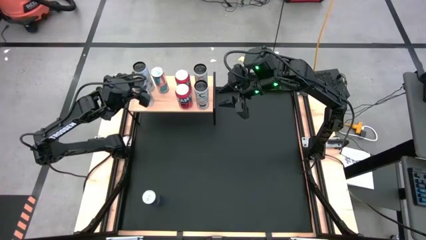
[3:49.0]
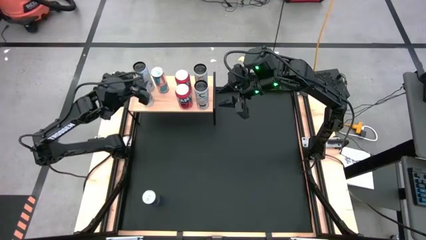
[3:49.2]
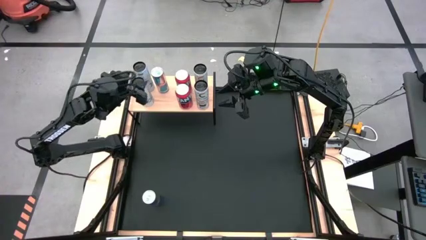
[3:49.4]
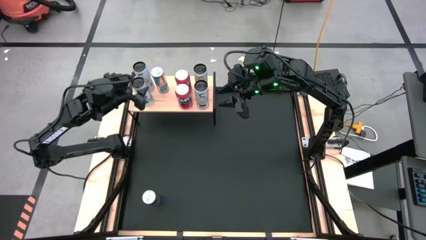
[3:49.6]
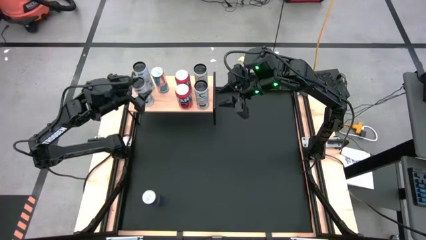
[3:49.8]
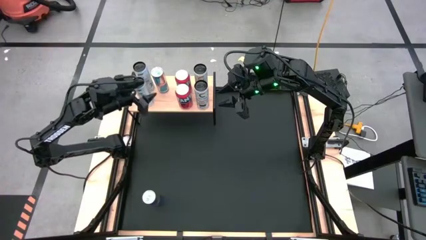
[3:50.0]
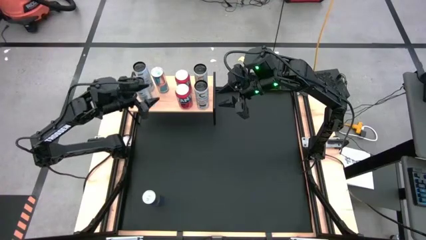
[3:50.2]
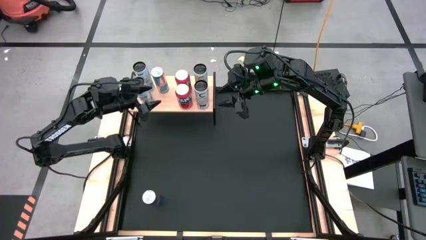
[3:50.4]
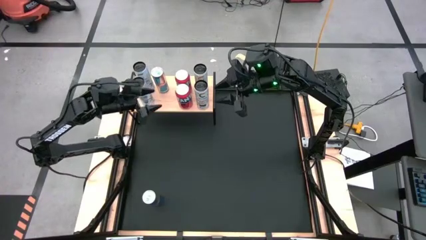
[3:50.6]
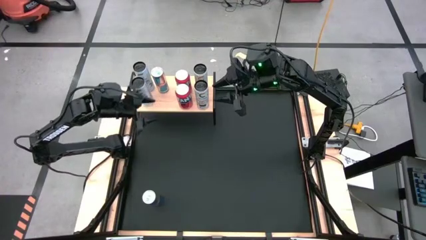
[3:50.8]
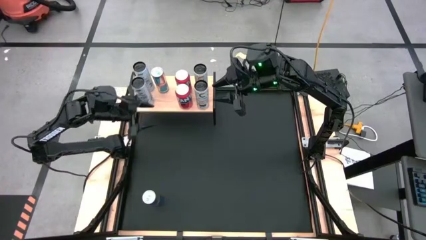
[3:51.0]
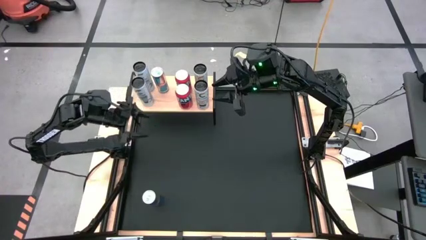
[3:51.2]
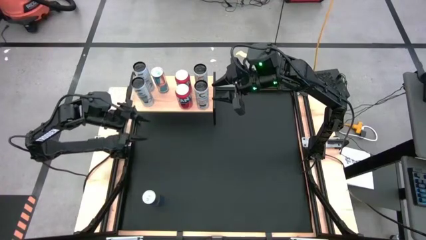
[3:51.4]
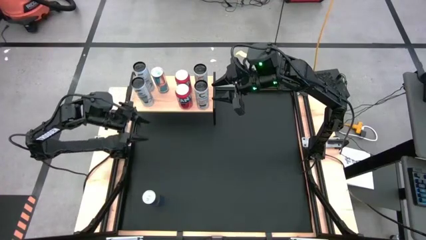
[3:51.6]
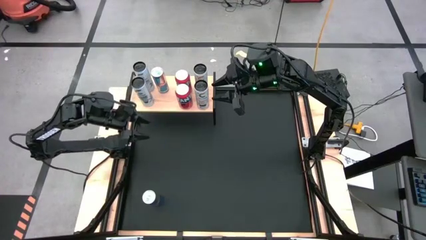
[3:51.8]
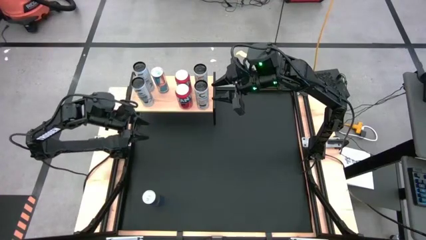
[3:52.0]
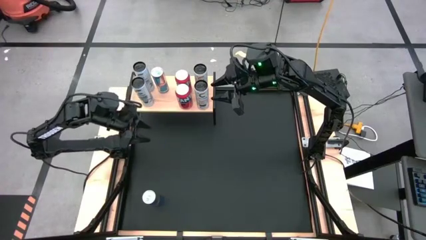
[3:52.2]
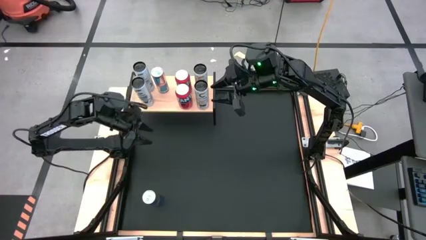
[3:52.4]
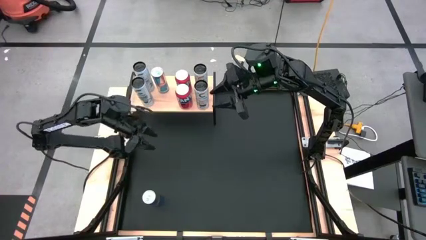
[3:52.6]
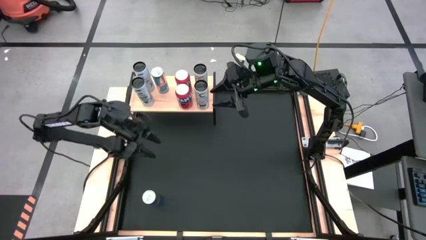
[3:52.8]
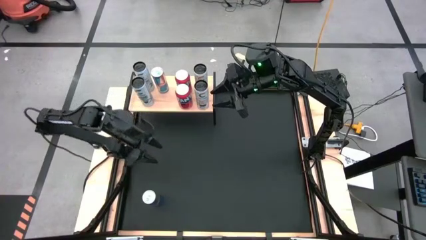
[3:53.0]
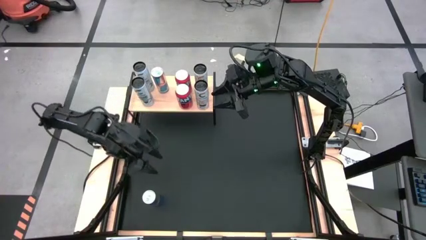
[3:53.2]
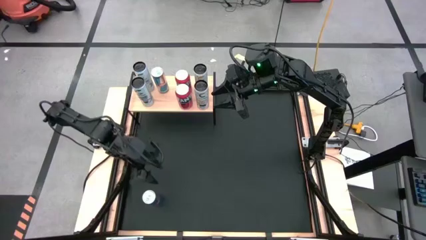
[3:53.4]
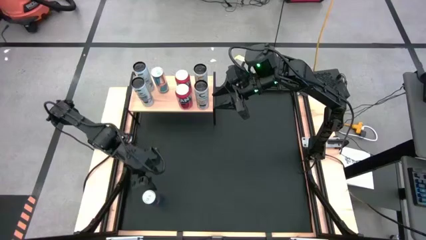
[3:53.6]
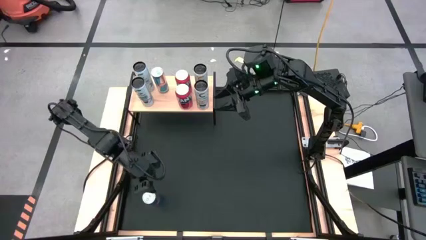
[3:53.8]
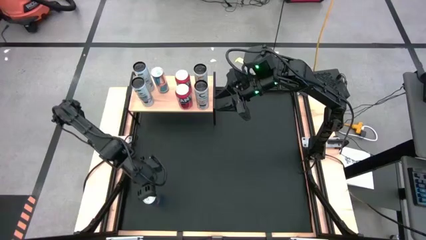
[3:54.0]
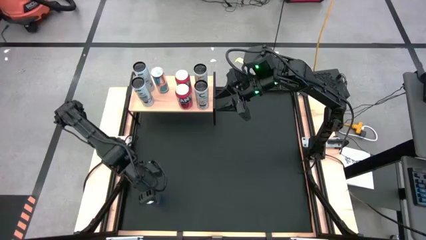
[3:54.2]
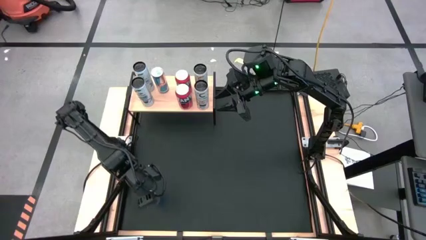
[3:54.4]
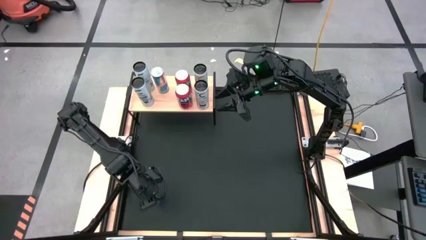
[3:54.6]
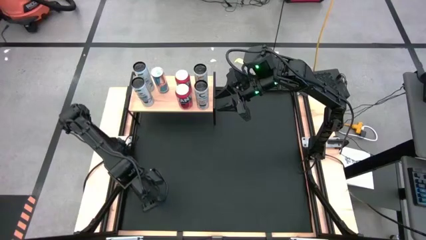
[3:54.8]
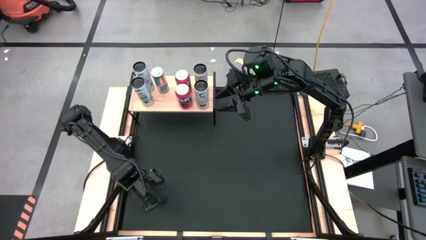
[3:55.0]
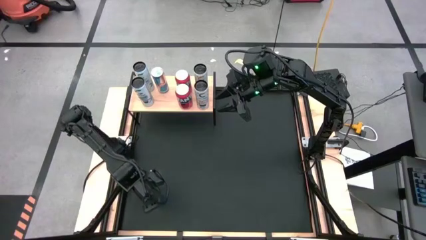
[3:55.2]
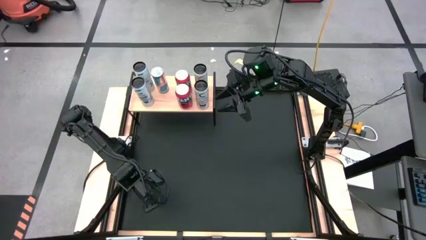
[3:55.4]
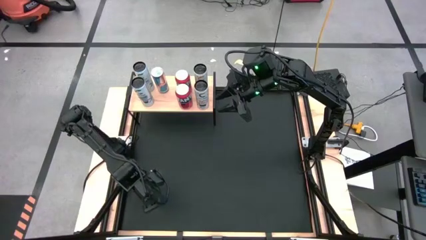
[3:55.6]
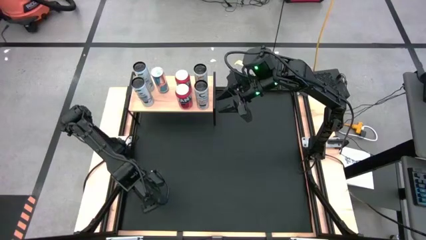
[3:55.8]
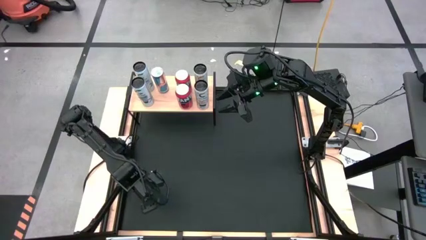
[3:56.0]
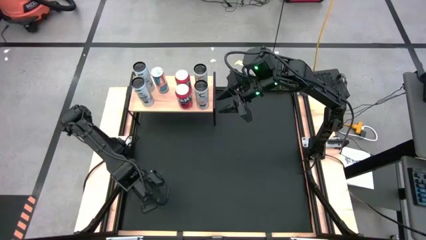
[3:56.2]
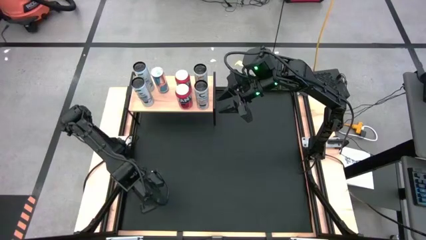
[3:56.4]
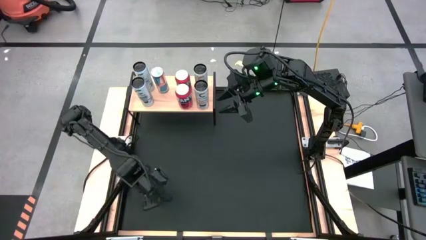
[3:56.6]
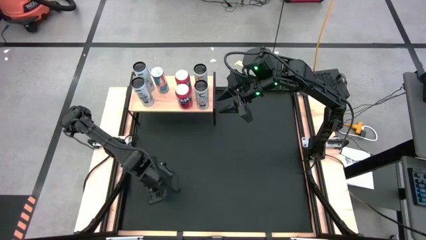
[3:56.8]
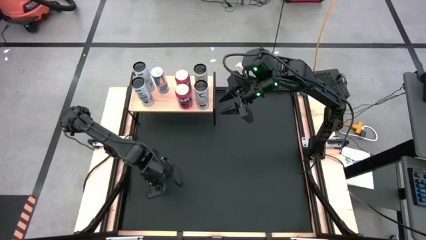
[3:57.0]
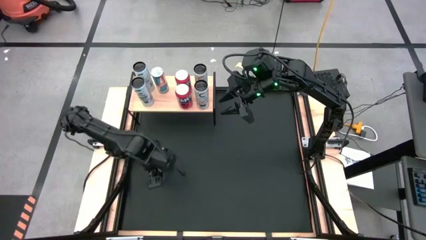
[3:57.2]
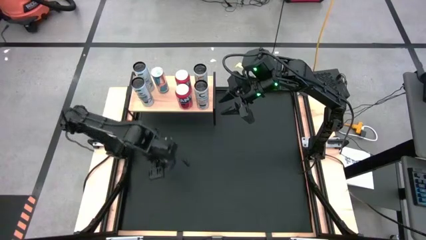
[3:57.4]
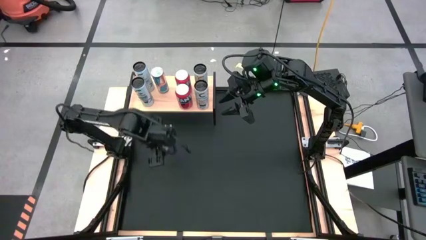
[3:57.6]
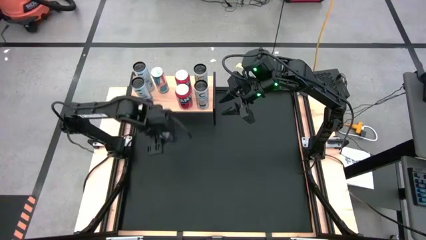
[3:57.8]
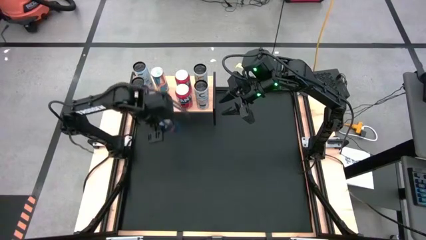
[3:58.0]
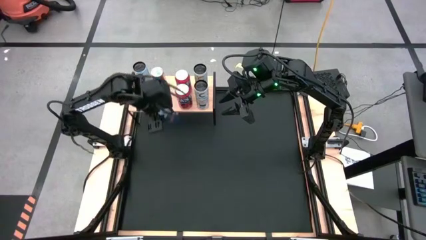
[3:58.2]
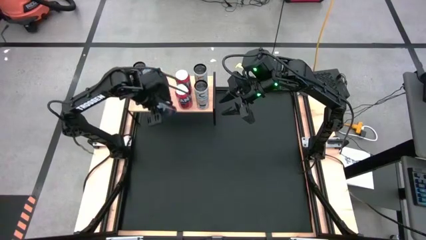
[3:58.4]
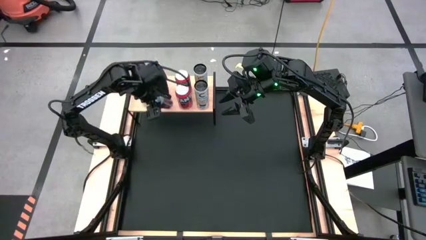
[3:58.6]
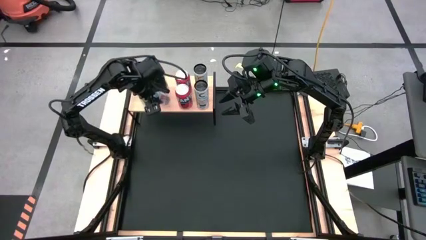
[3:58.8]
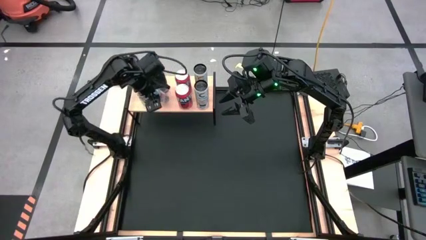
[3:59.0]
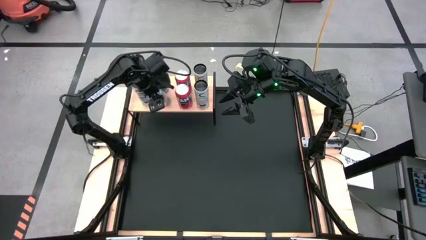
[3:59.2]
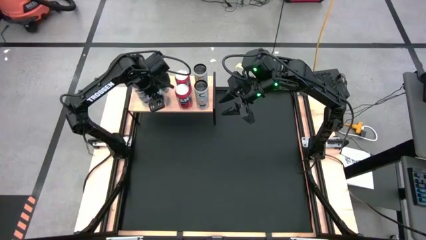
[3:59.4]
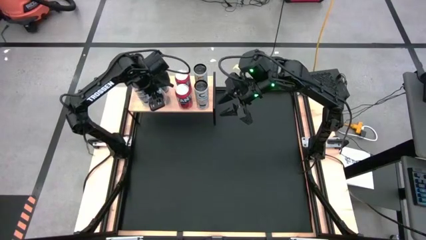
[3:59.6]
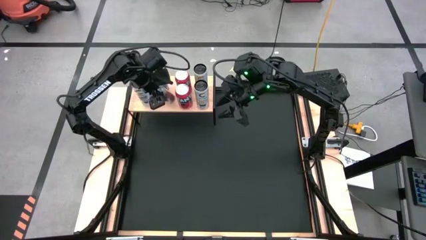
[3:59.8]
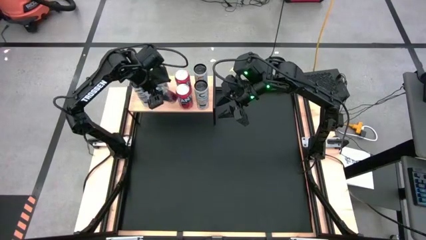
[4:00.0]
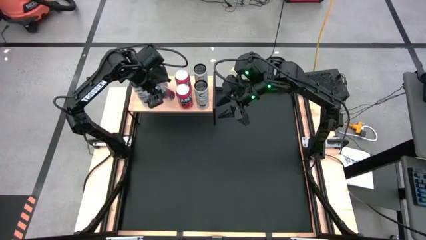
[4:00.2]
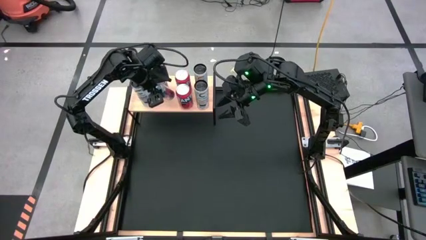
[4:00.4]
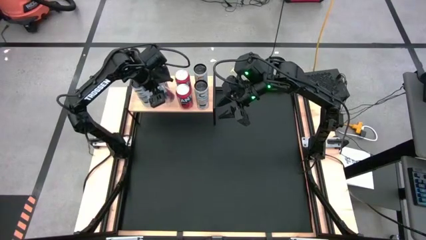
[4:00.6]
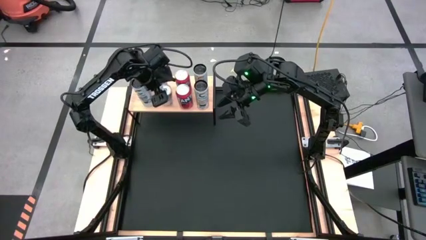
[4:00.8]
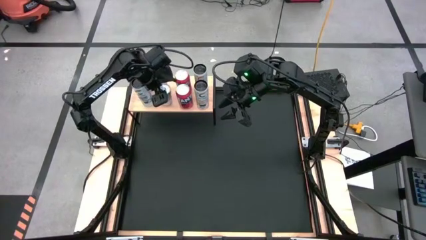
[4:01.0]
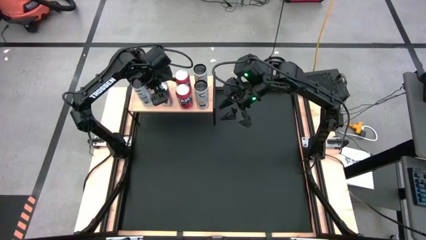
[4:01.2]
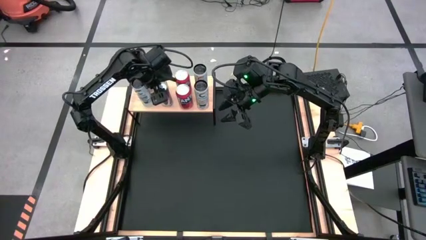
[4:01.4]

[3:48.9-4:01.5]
Task: Place canned beverage on shelf
Put the blue soda can aligned with the other blue soda can on the shelf
